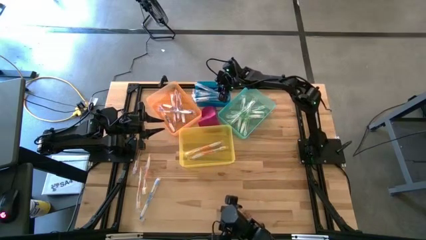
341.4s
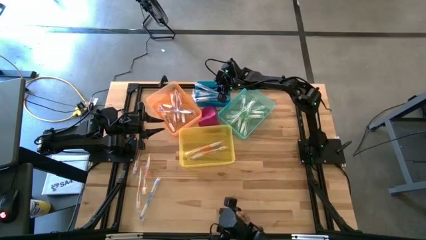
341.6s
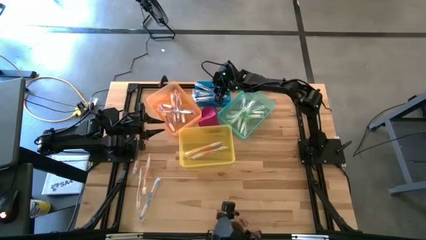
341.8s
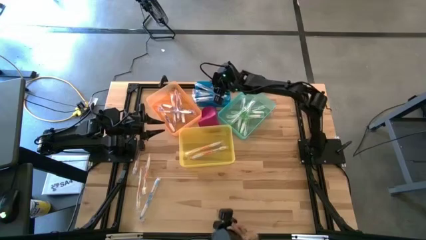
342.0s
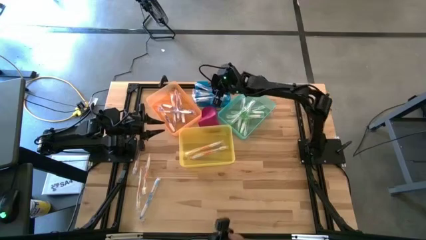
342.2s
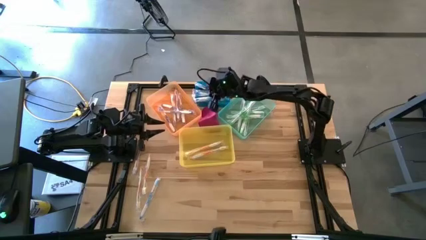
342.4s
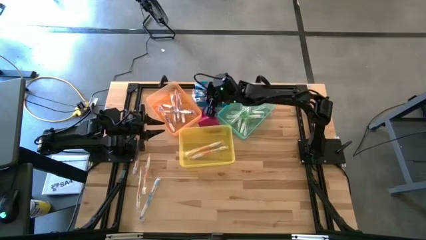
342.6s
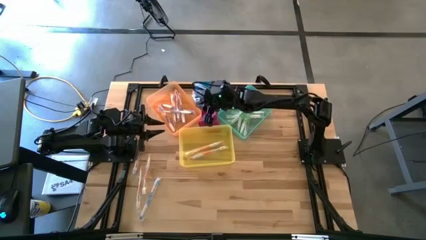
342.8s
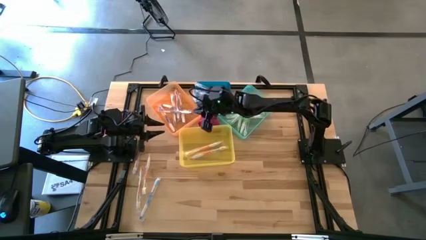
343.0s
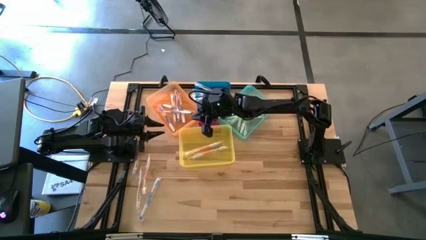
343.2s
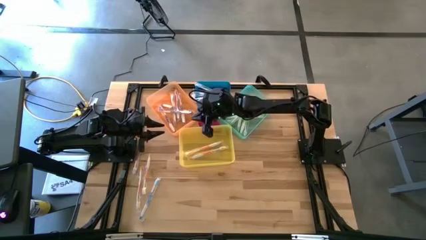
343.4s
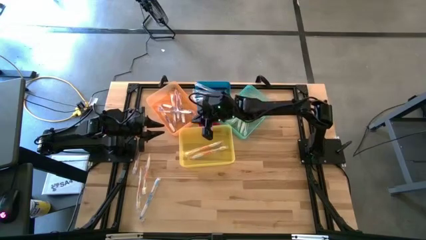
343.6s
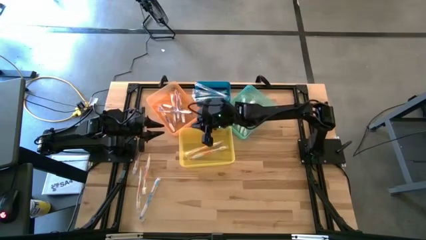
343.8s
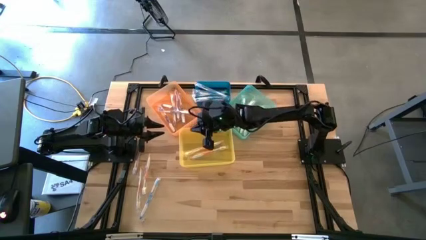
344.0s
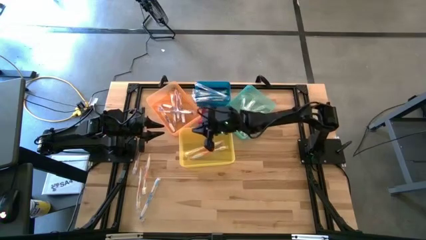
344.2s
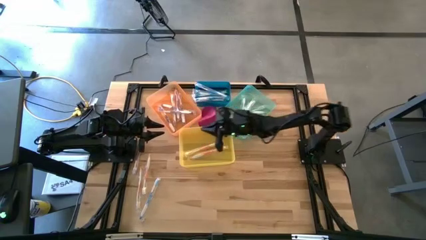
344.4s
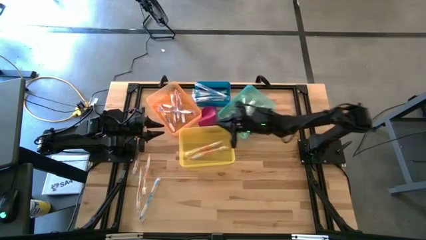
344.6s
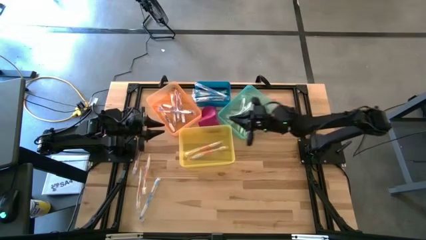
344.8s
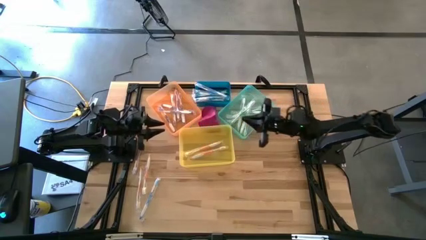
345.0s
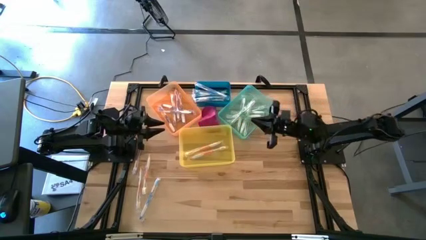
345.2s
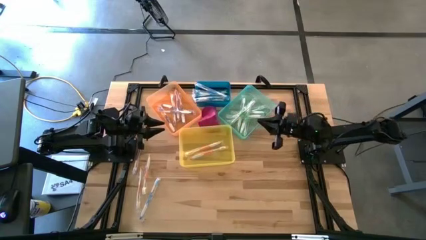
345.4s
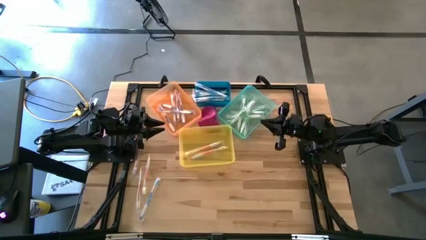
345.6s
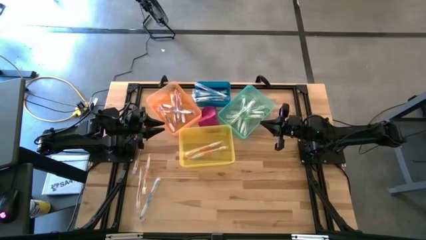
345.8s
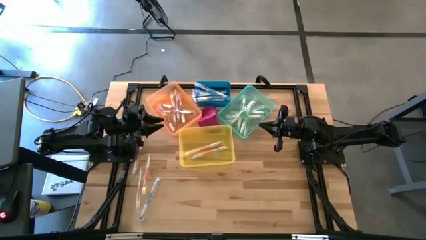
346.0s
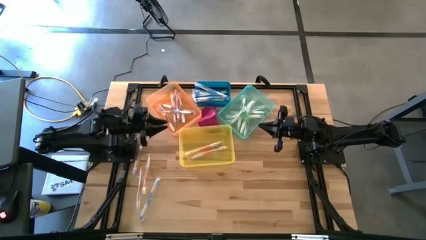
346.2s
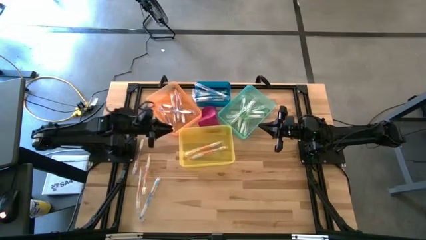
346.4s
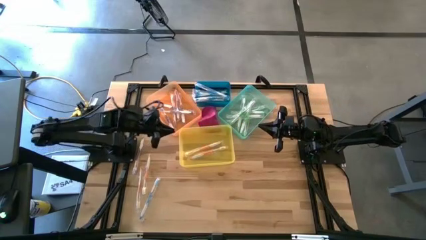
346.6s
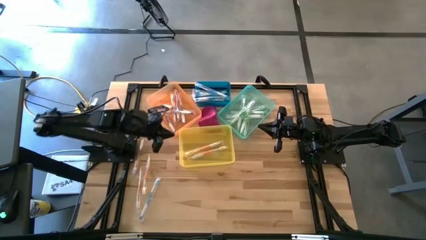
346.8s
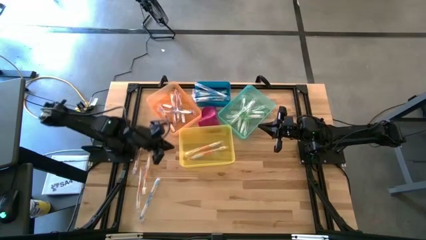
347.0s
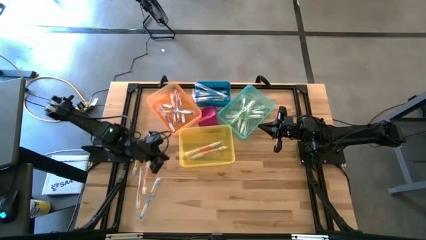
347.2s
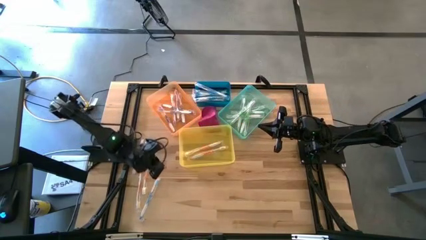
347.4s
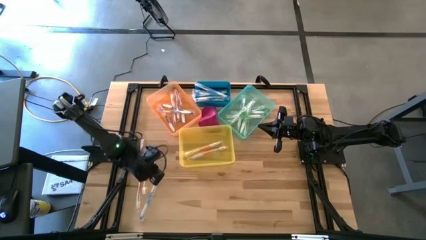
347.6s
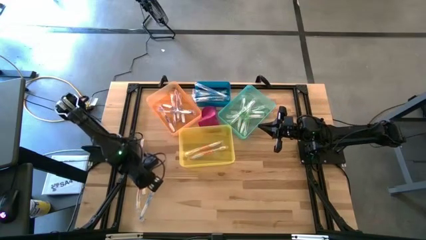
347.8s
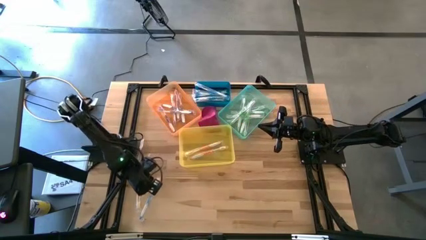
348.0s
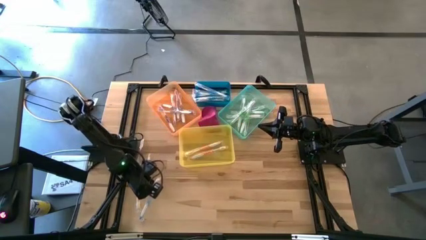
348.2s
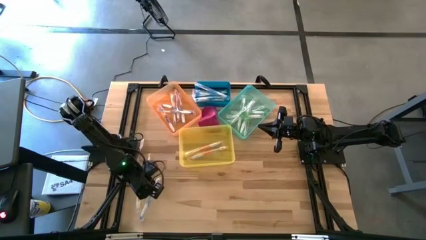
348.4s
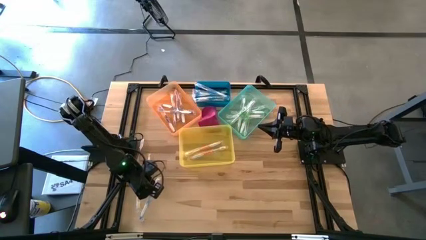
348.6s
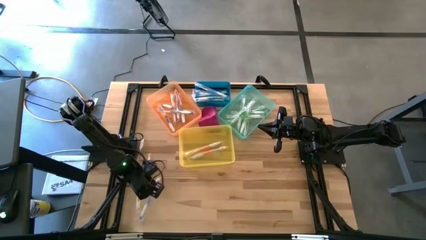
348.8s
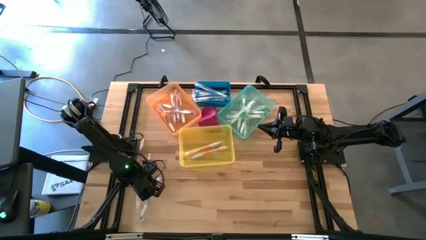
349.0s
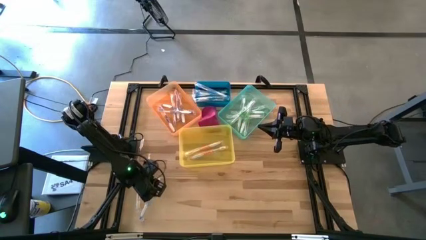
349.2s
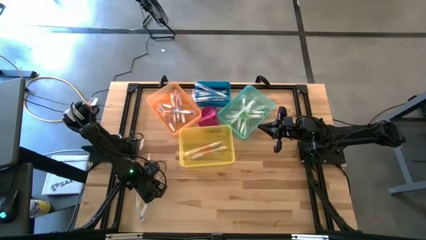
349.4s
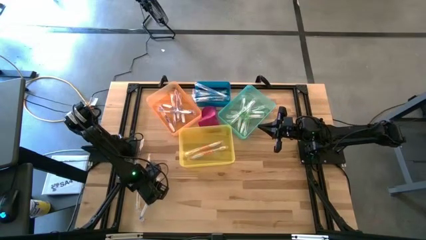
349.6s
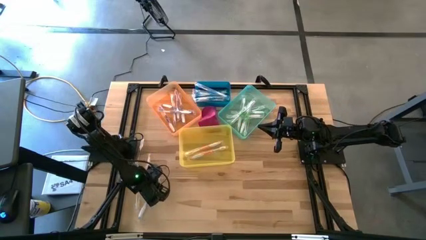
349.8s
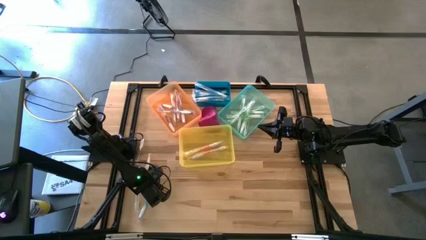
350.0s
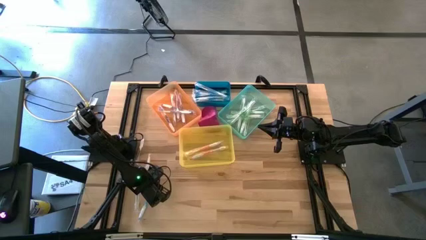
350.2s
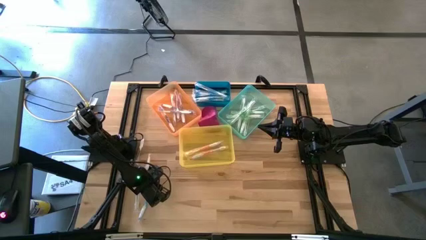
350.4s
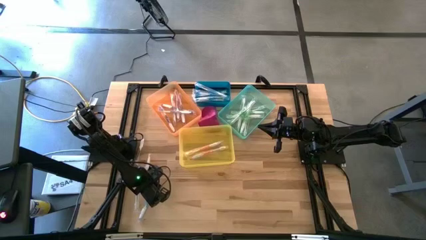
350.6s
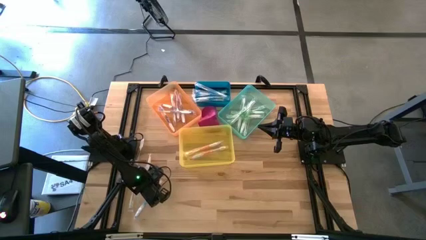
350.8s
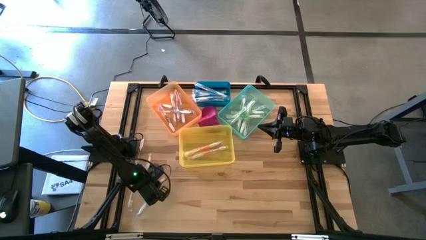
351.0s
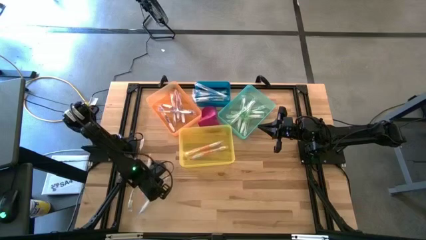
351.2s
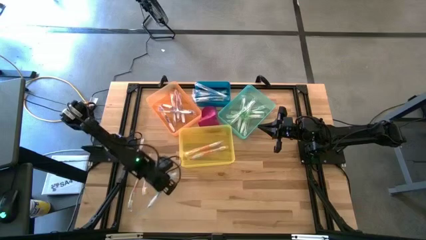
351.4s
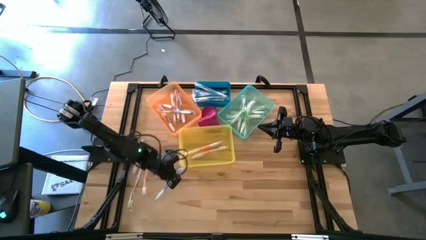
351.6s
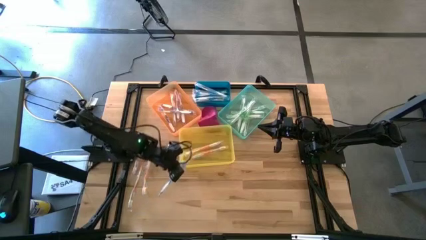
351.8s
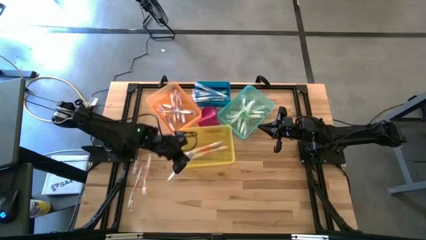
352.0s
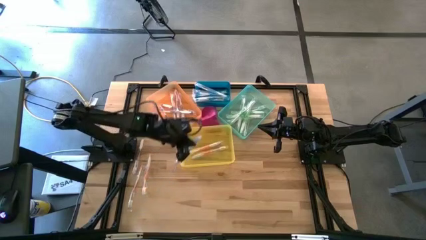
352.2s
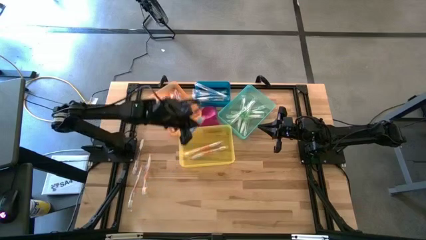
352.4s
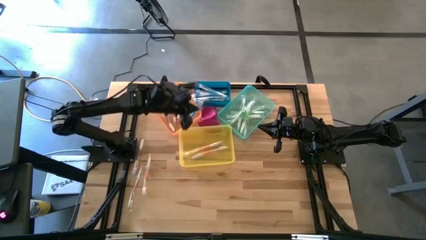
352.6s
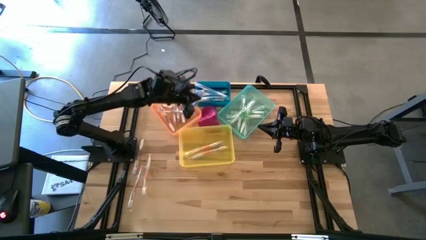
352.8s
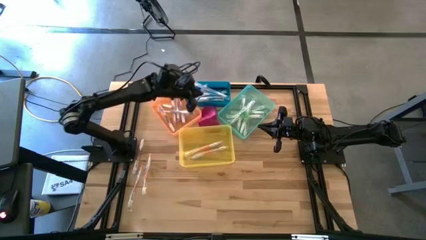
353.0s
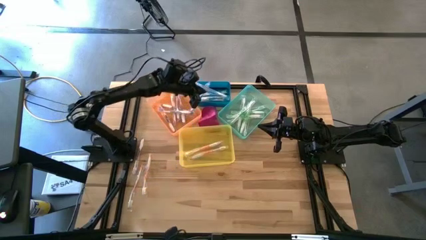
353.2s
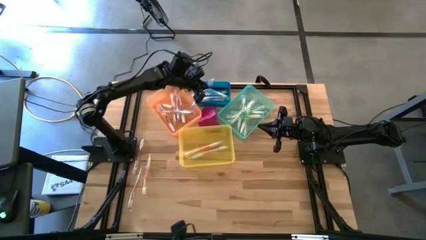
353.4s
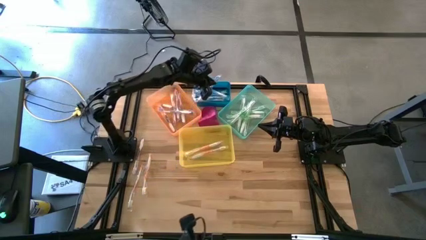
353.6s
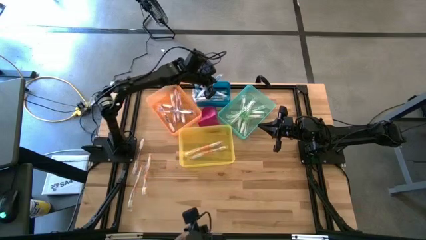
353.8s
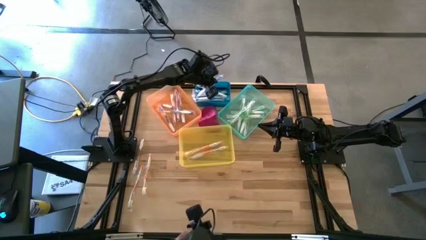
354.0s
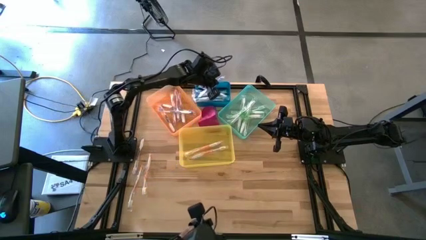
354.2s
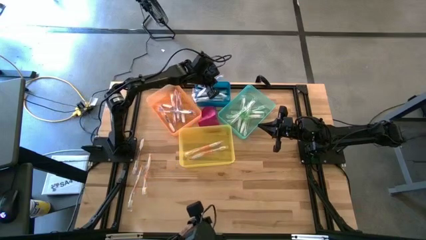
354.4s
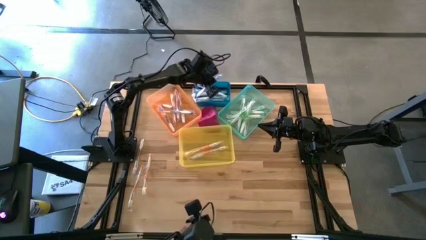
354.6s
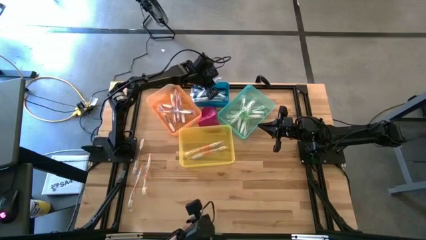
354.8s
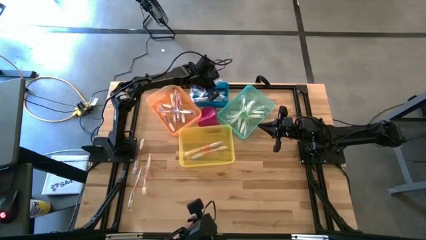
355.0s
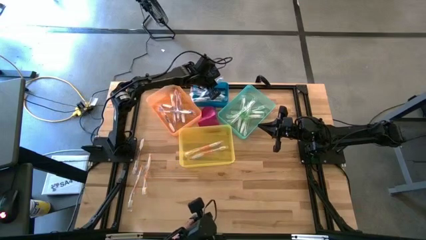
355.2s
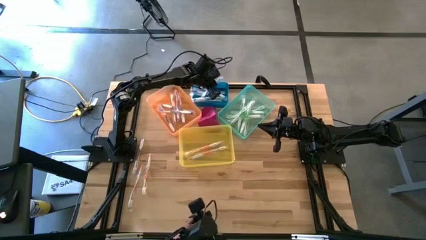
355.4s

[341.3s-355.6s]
Task: Pick & Place Toothbrushes
Put the blue toothbrush into the blue bin
